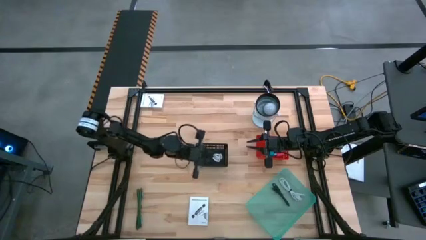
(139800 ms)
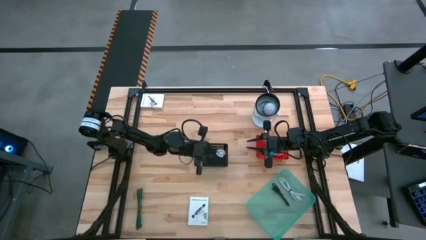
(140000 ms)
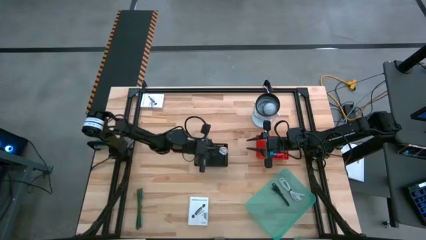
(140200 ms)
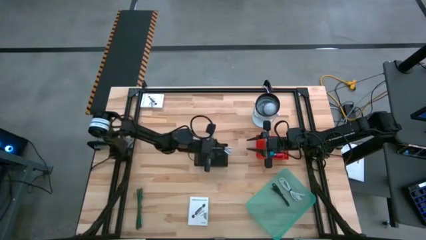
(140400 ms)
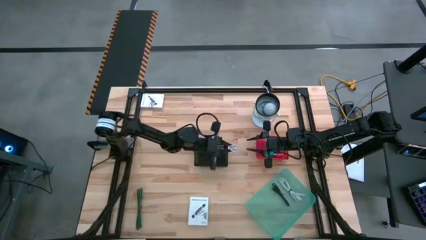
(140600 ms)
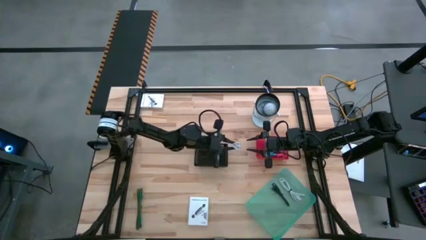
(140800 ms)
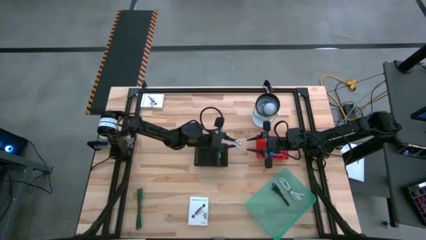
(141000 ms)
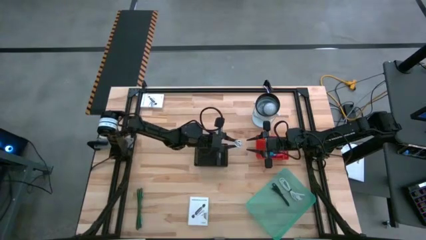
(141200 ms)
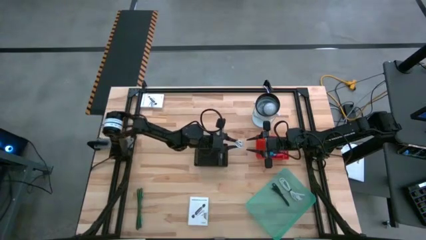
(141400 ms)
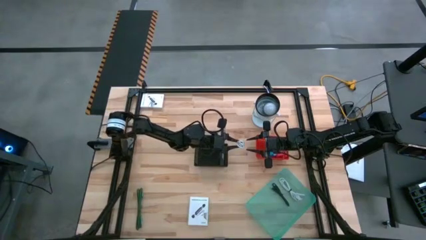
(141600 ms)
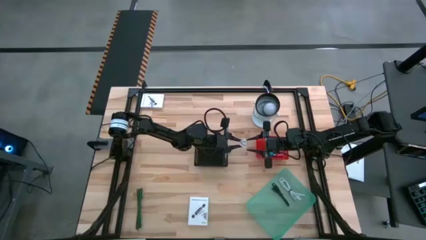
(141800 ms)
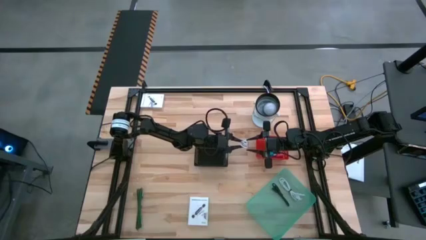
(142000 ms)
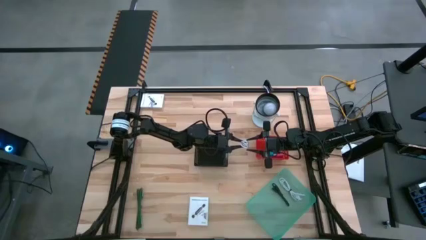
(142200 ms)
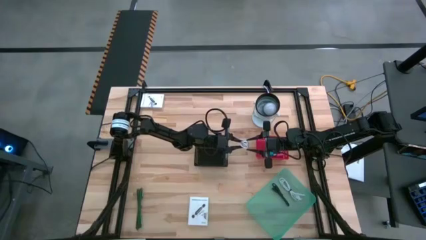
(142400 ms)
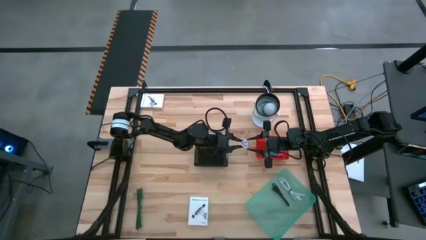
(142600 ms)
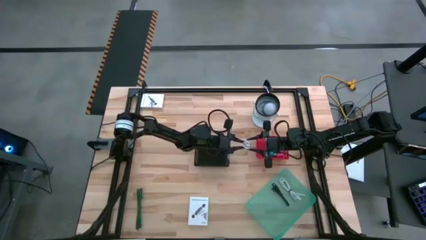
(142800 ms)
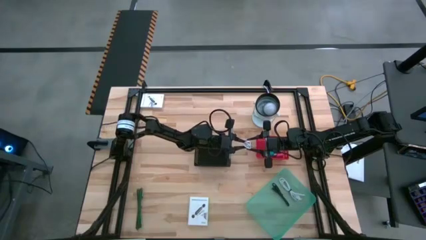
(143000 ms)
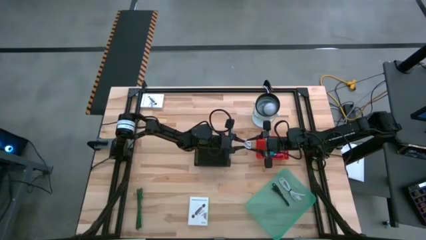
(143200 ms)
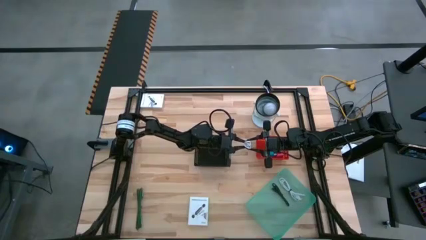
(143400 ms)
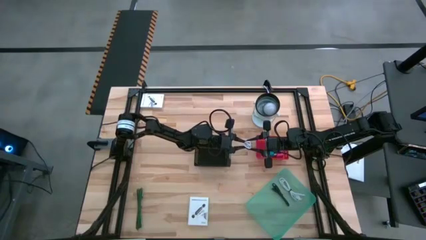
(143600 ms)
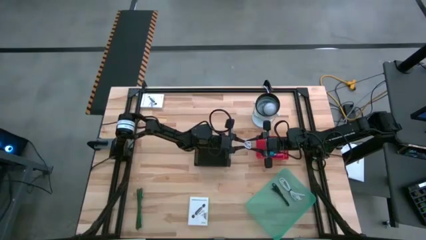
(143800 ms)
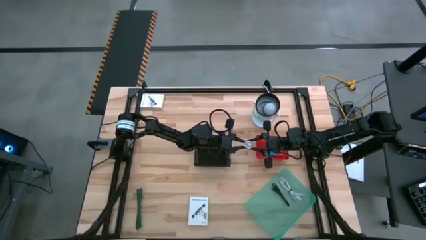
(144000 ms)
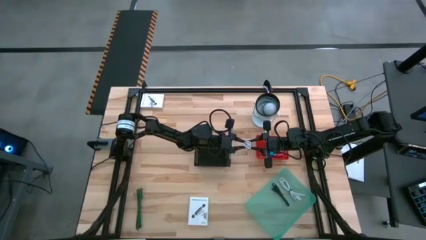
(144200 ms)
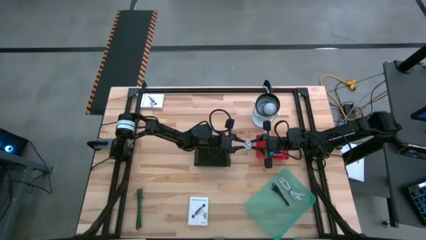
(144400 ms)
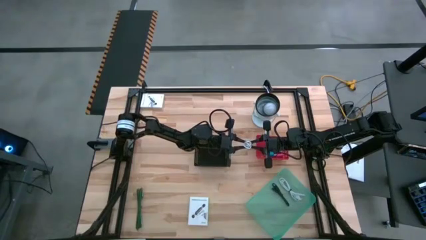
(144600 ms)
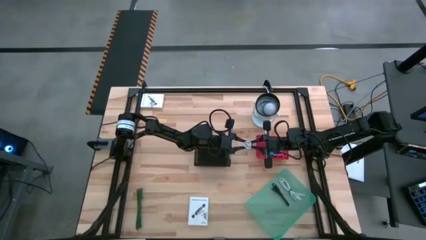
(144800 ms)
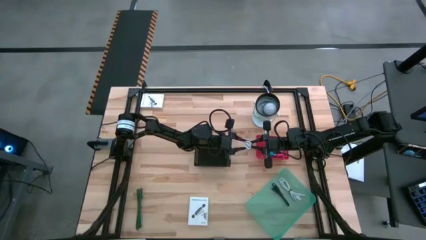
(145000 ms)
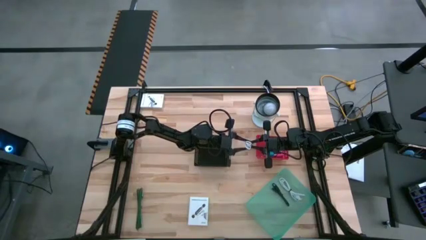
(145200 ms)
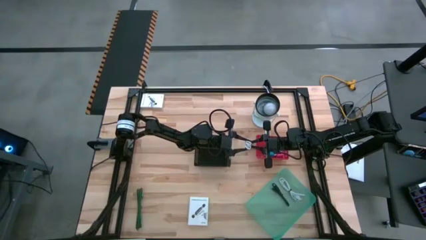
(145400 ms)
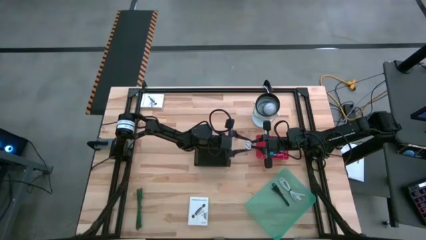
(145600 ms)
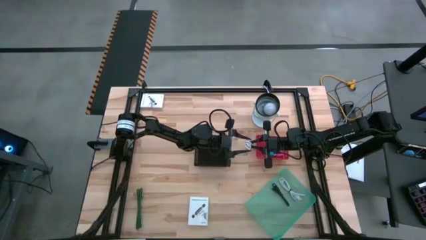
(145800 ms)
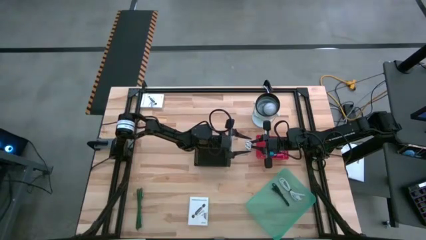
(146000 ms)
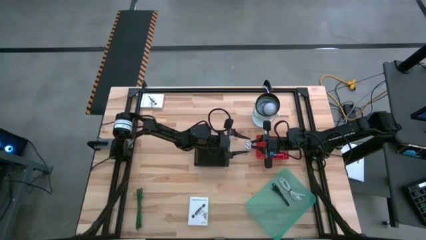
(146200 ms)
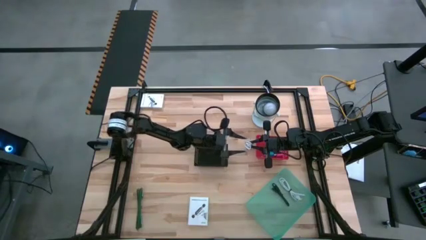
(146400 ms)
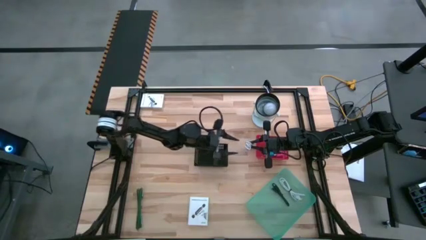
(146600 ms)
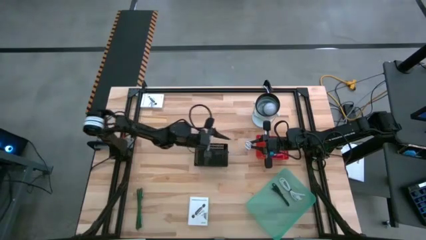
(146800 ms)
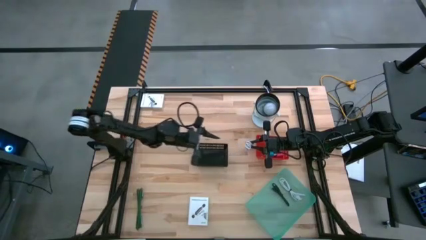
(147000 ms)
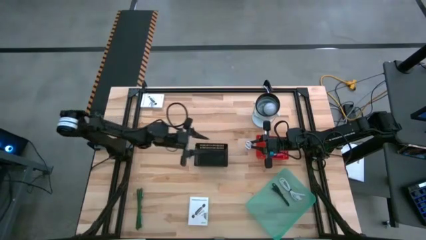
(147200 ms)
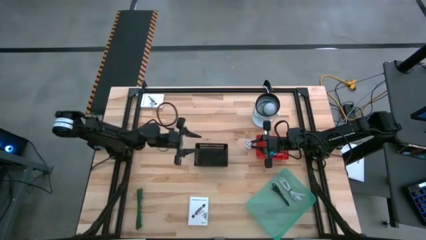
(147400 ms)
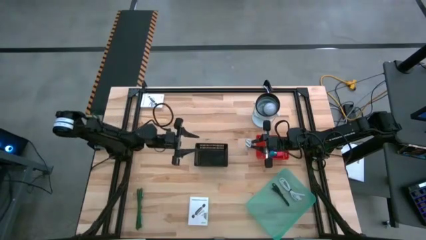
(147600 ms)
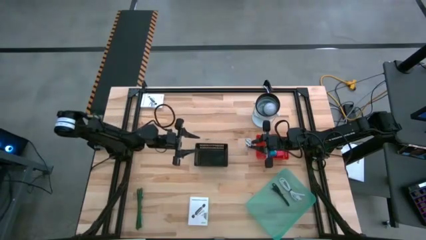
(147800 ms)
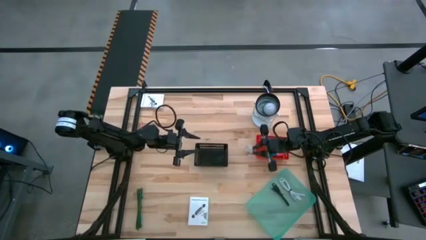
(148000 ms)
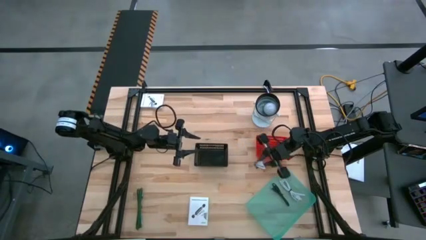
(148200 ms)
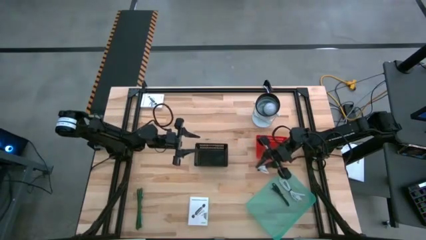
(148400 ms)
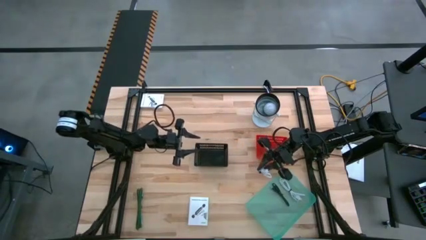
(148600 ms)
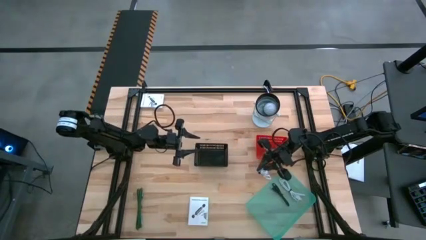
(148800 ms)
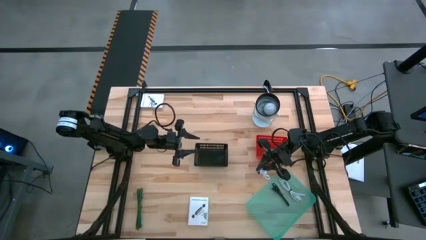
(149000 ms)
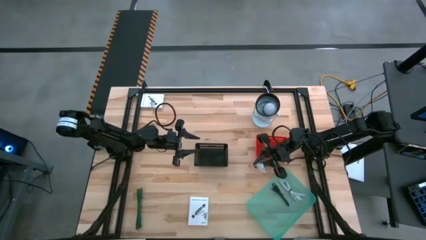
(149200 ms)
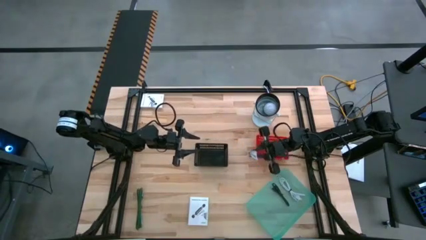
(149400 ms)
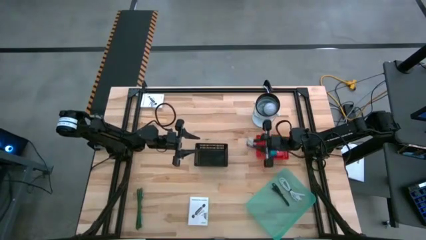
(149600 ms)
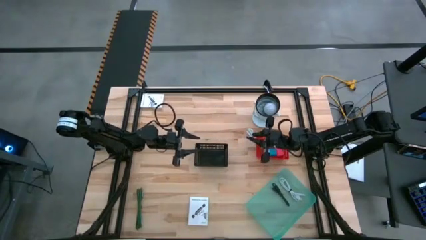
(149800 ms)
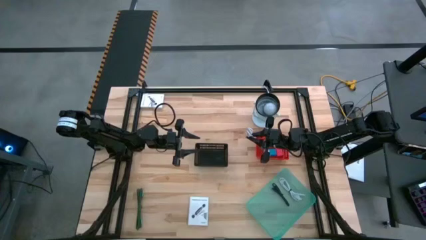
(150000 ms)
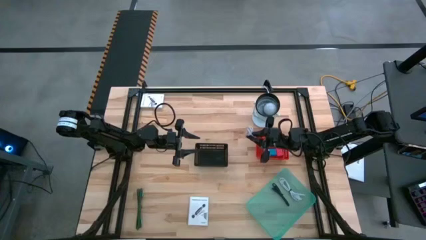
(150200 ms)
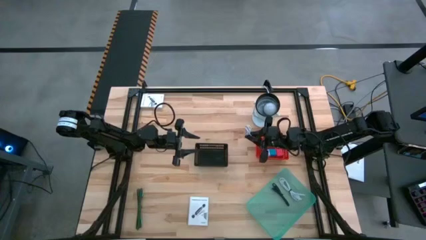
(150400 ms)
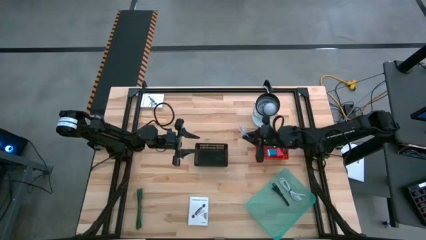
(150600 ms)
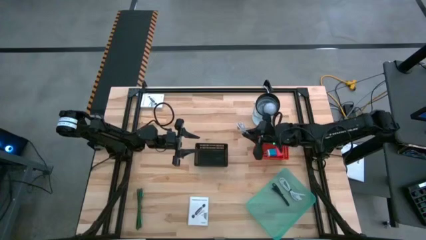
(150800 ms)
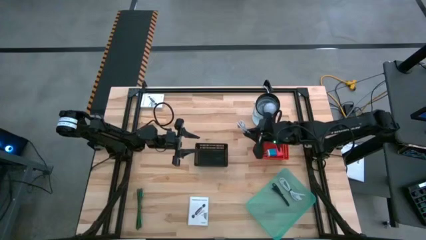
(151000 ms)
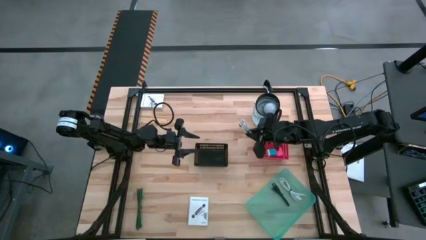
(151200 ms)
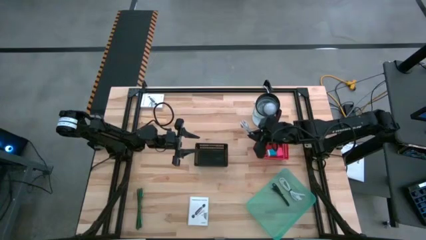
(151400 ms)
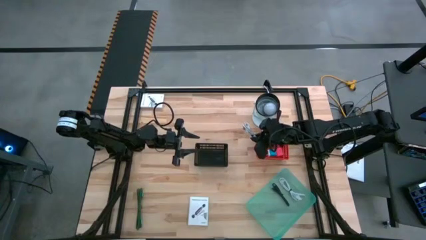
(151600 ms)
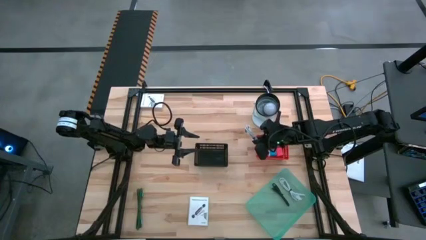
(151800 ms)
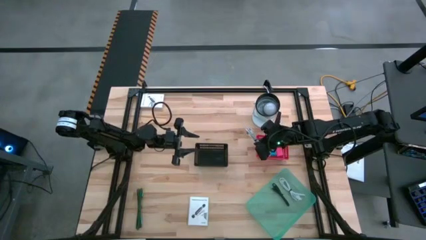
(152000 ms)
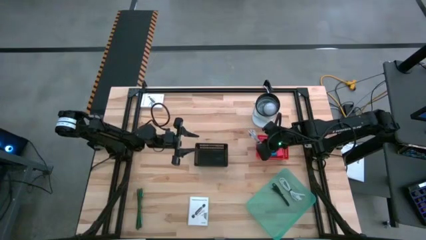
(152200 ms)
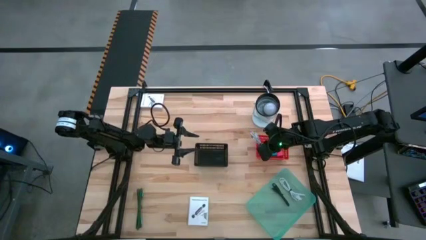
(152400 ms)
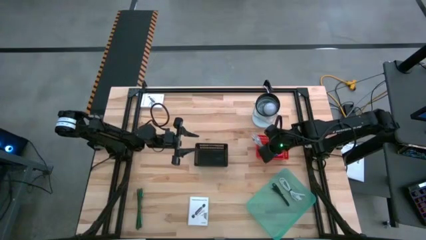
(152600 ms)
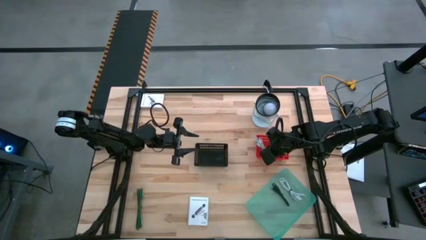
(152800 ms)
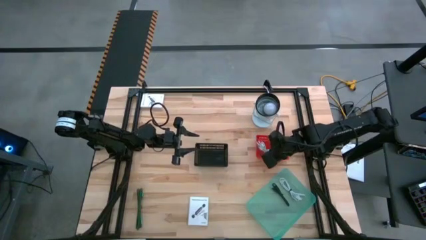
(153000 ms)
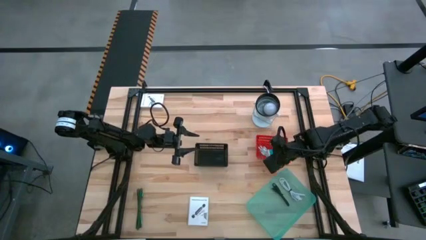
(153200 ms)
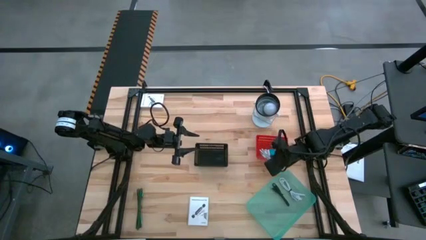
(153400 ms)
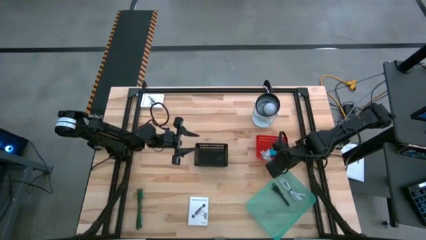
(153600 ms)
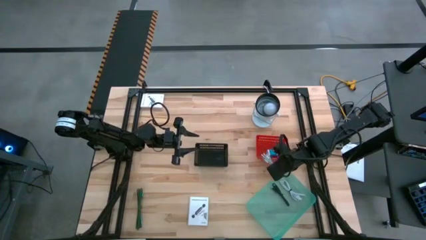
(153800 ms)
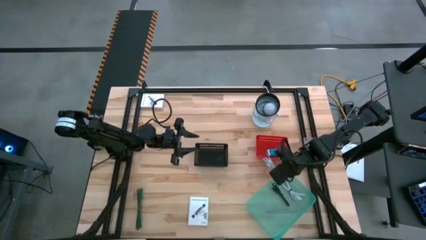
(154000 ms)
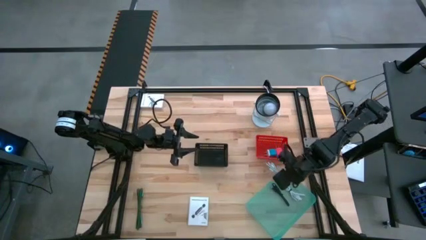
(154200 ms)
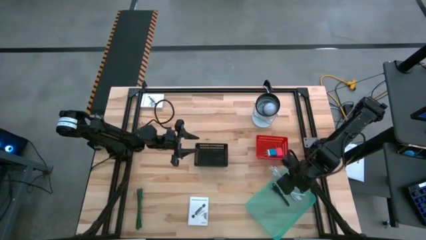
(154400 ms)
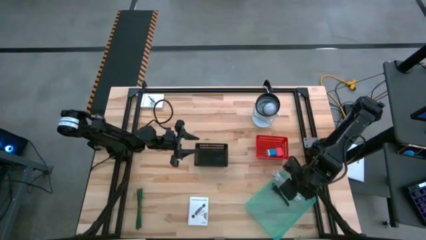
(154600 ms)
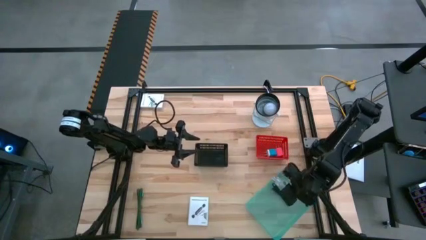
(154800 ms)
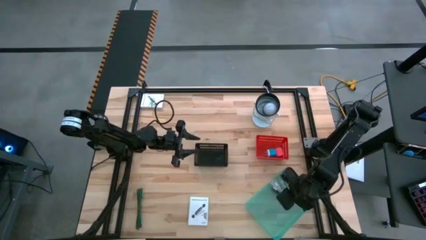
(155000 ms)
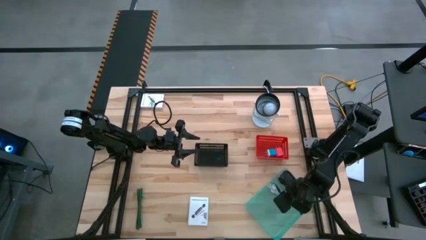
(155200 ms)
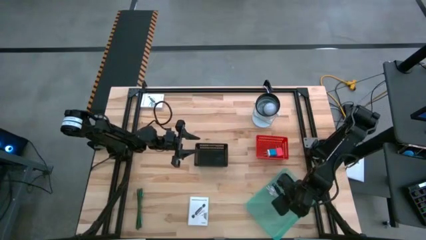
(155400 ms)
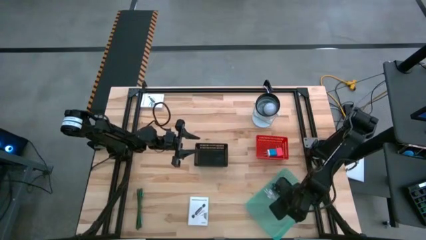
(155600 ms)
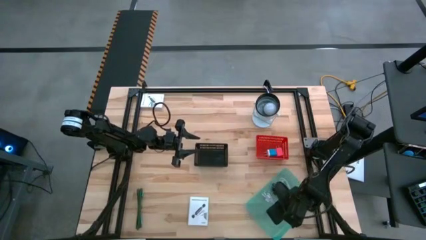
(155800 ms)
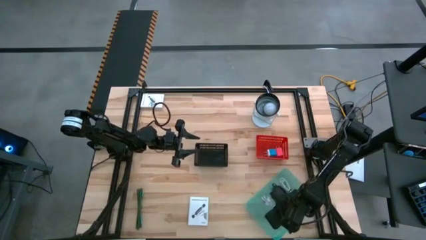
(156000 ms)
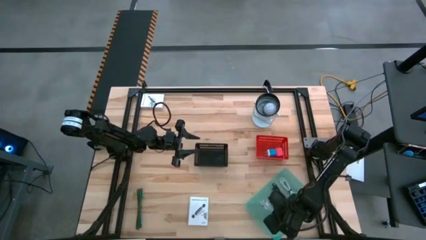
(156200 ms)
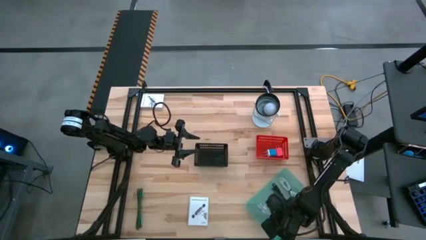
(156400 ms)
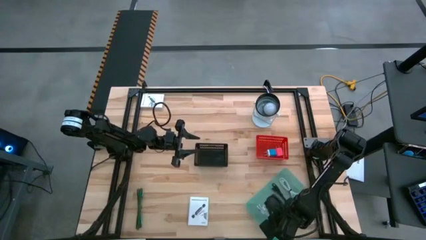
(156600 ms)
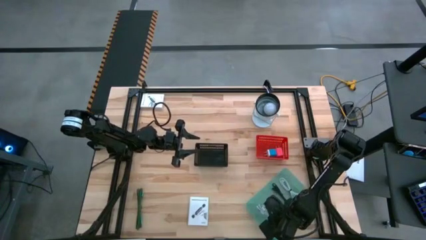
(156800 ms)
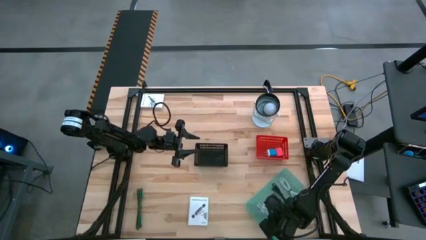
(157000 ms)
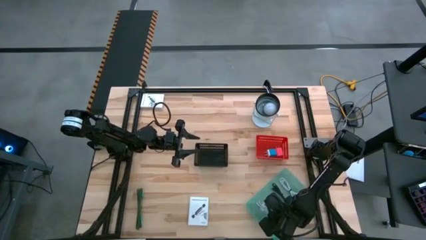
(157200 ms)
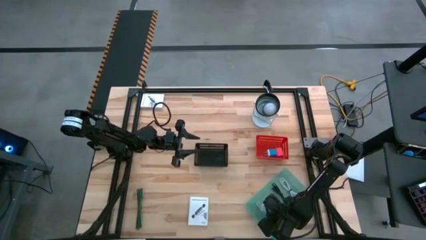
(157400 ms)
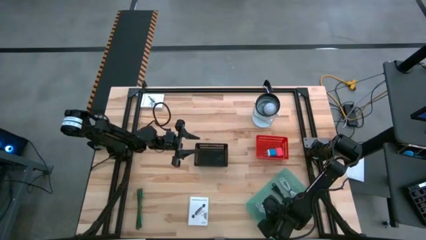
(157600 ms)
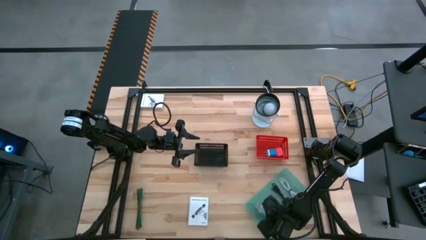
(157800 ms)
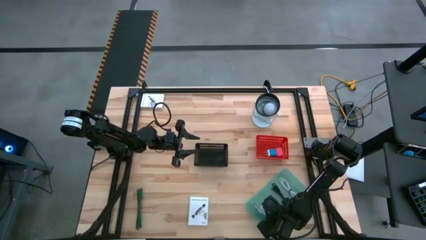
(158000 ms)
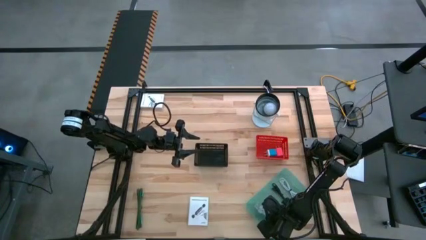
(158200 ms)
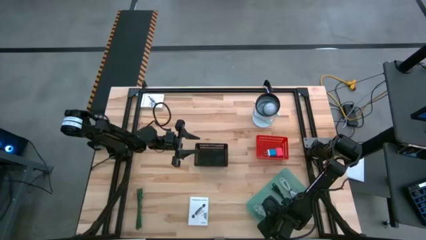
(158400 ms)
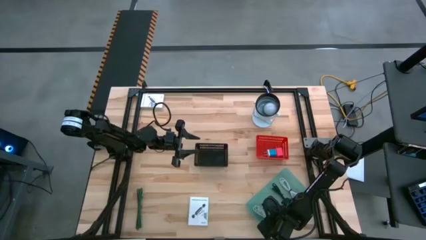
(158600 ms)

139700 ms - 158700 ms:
Task: Pick and place items into bin
Put the white charger cable into the blue bin
